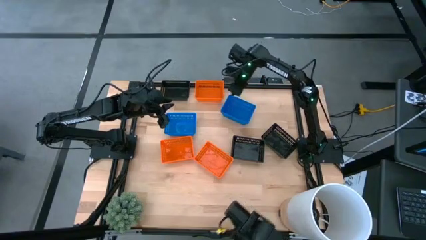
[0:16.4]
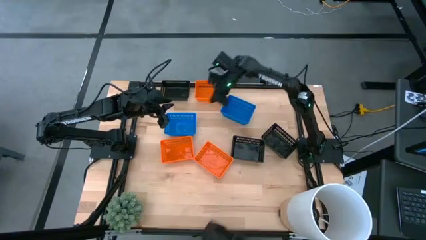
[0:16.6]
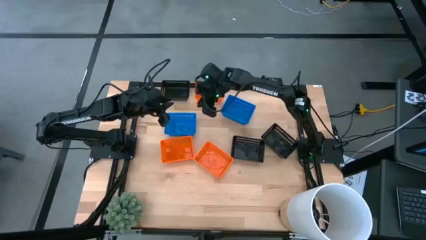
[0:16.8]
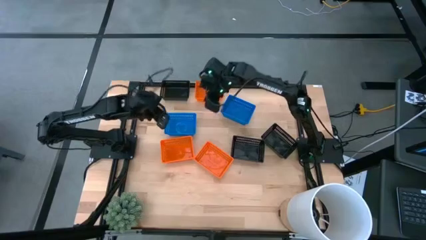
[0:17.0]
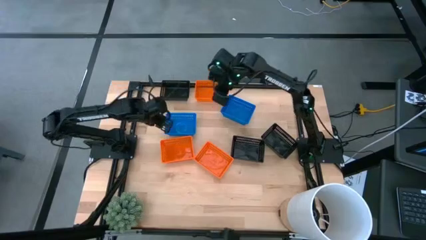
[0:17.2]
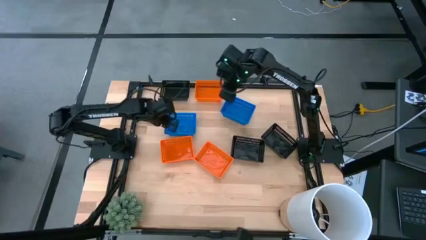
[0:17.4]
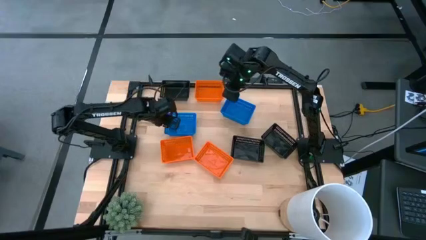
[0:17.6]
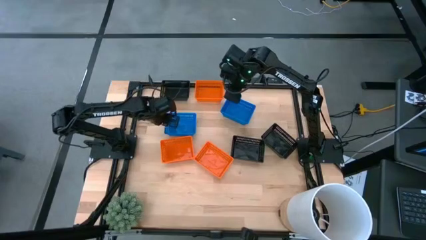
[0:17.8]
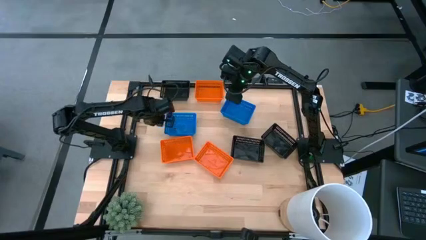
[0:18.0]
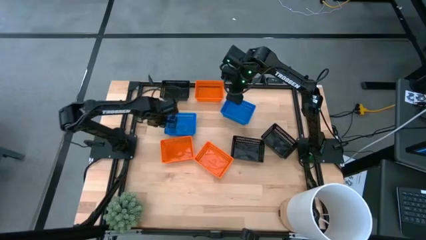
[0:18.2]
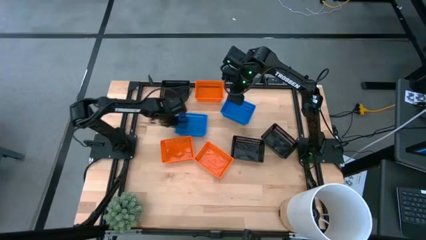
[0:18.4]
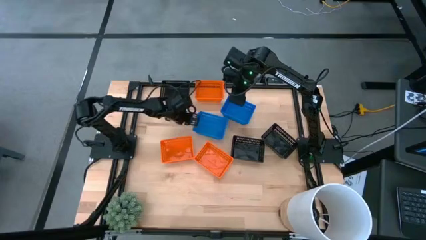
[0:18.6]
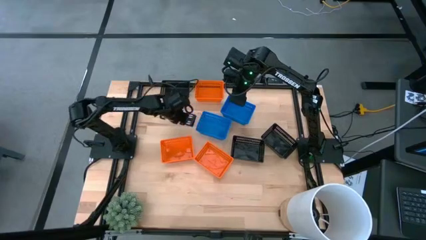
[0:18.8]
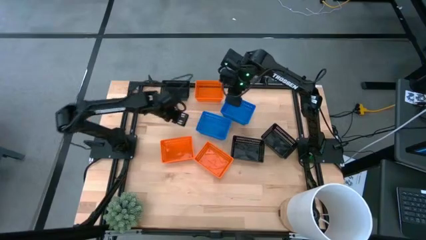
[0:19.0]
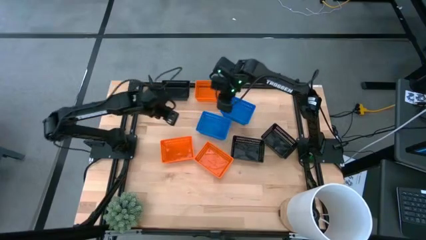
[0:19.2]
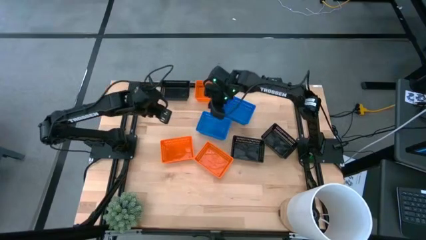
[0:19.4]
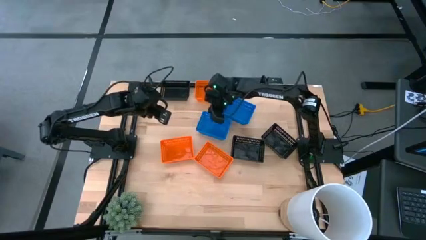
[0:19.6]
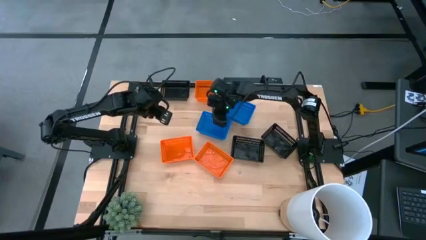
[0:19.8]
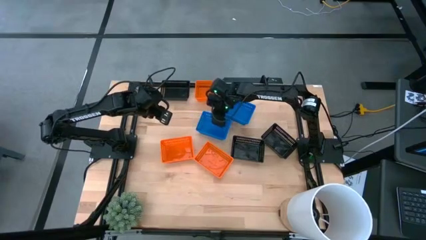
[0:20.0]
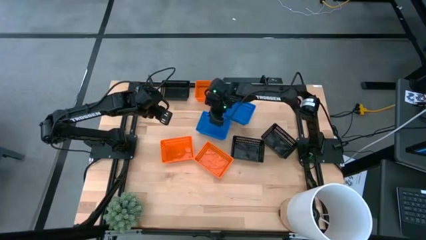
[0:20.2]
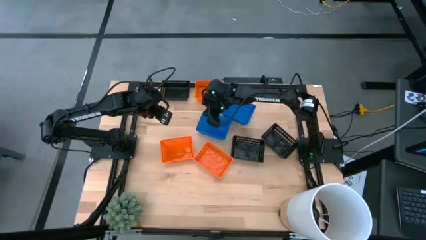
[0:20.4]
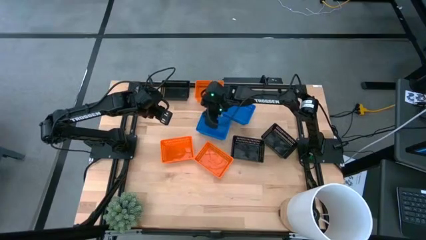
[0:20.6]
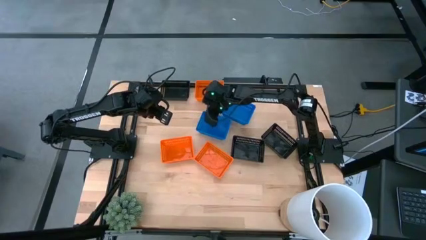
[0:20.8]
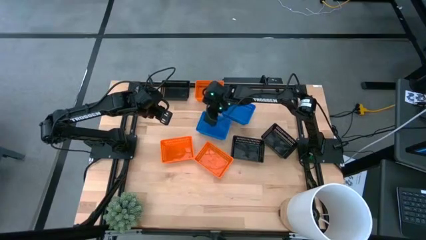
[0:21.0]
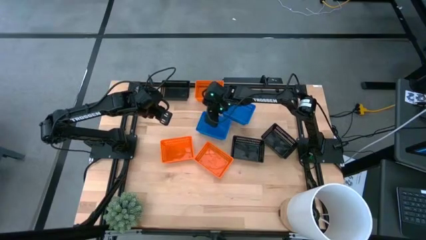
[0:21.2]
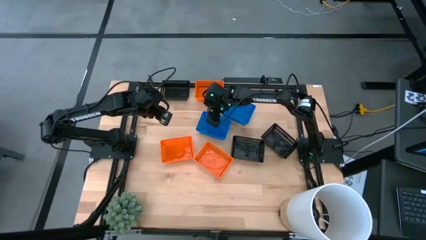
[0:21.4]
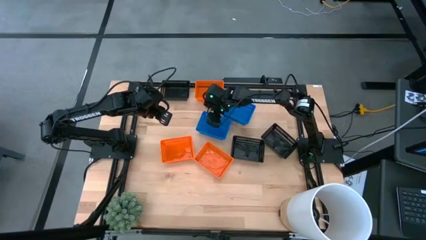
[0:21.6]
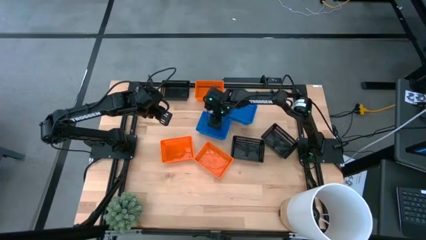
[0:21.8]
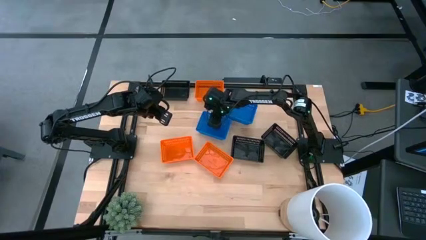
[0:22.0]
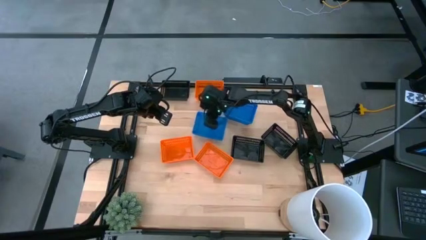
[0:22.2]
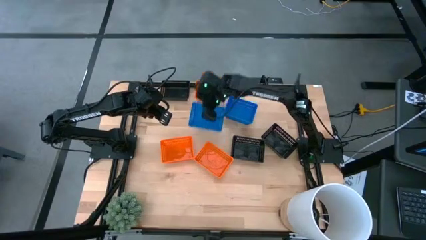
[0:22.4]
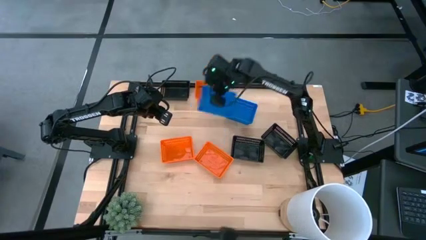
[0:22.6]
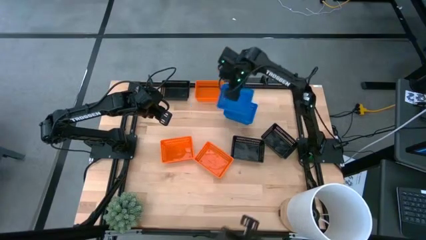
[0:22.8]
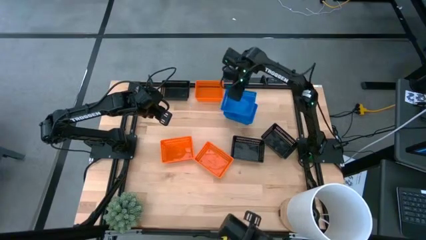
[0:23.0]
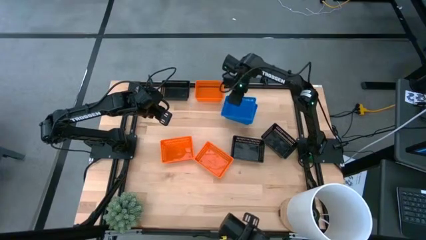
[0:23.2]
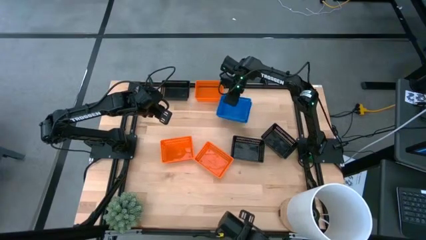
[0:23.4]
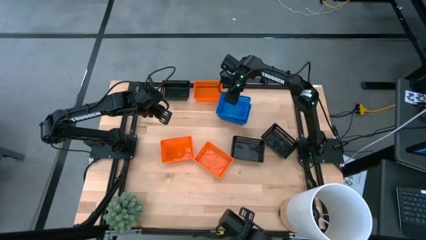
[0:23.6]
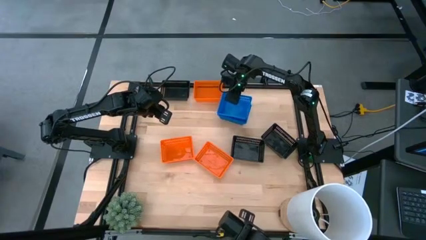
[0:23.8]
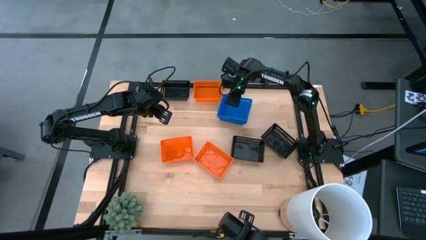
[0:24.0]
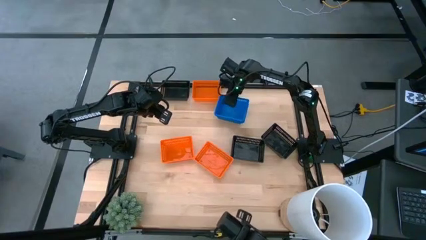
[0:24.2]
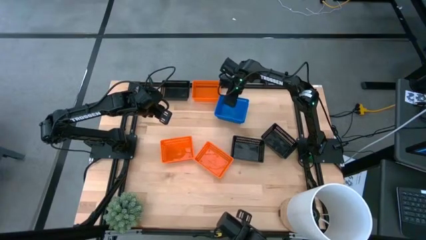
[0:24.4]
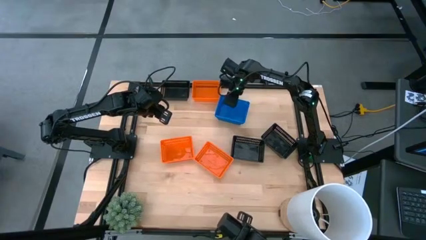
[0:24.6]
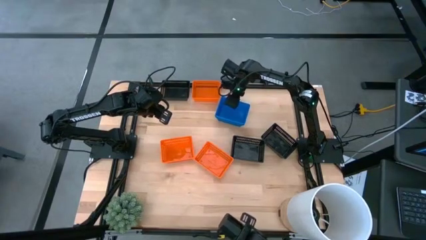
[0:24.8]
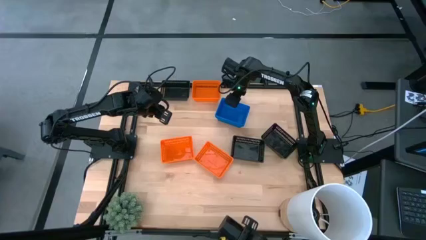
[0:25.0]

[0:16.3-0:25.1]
Stack the left blue bin on top of the right blue bin

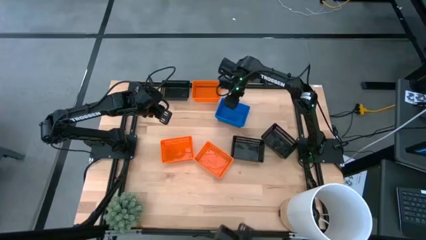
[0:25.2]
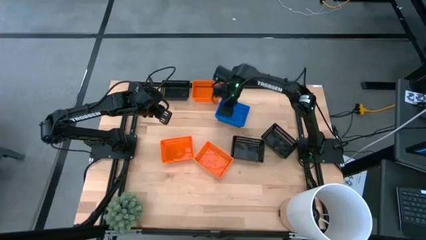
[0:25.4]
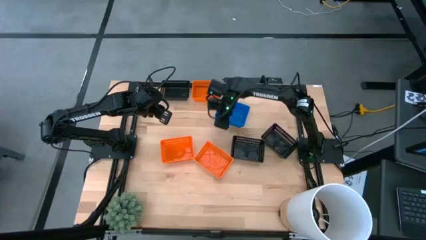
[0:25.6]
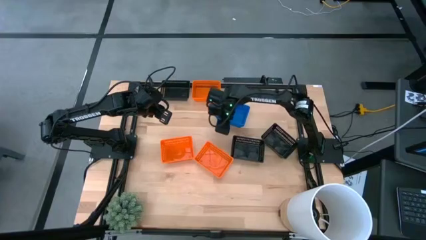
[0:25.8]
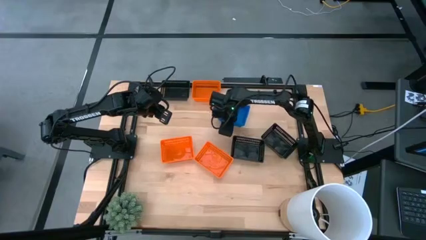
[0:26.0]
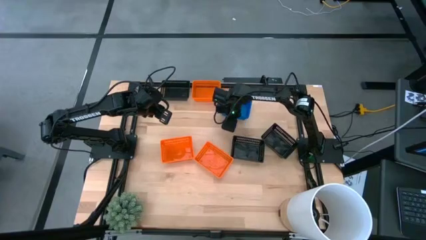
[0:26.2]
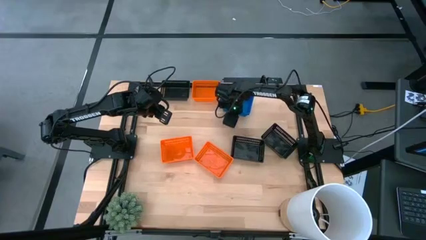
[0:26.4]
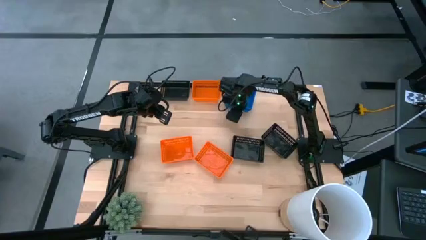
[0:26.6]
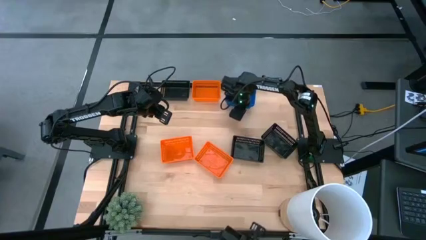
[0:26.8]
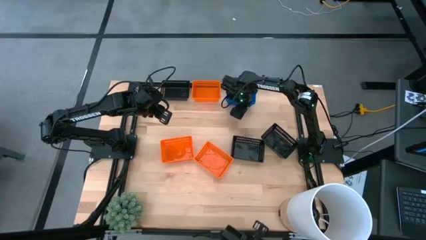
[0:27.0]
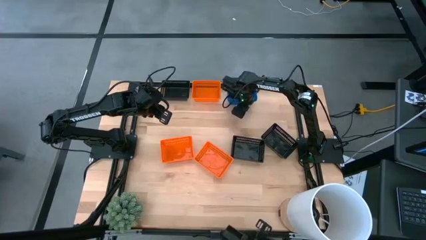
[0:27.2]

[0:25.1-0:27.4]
Adjust the stacked blue bins

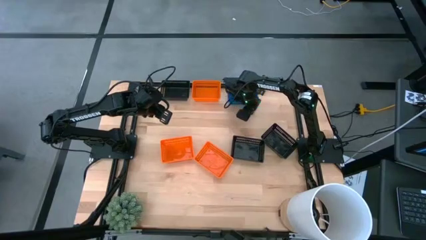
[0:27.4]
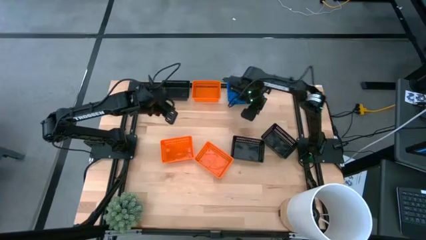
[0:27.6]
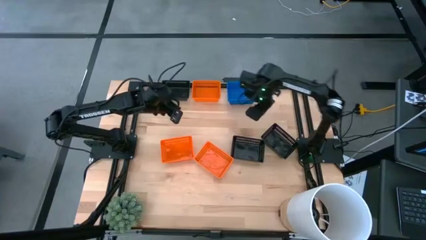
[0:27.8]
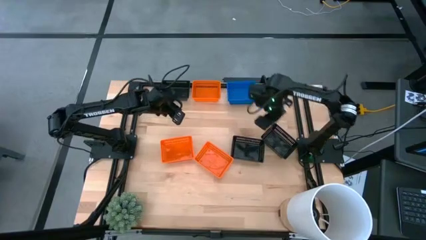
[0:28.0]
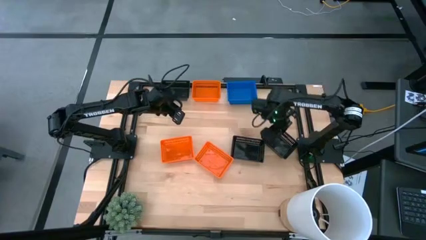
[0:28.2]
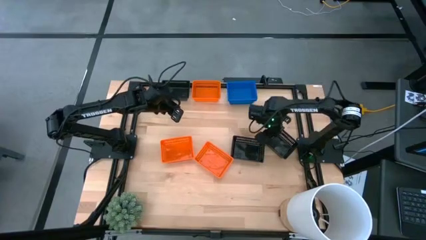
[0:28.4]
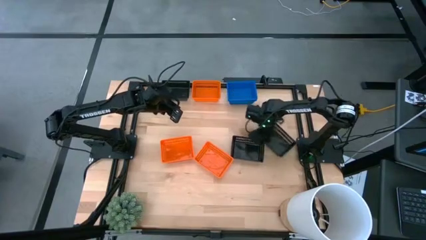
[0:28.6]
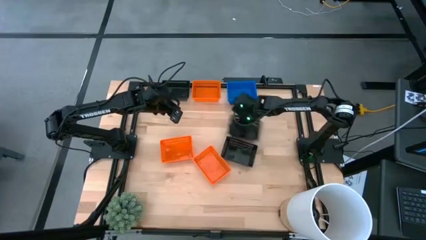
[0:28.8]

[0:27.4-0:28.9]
Move the bottom right black bin to the top middle of the table

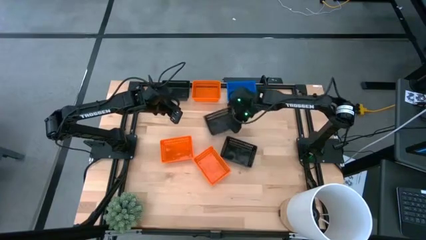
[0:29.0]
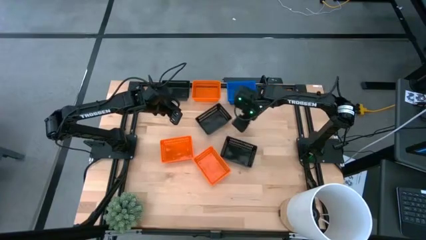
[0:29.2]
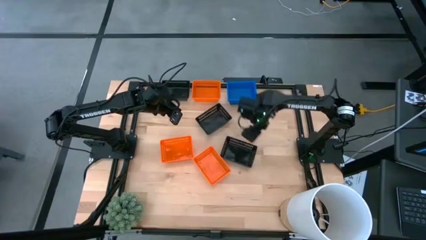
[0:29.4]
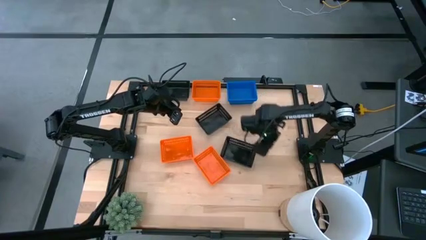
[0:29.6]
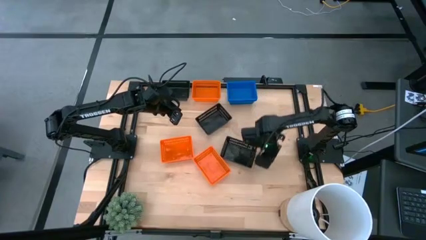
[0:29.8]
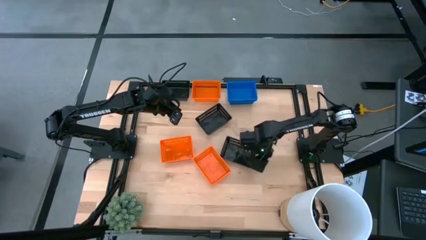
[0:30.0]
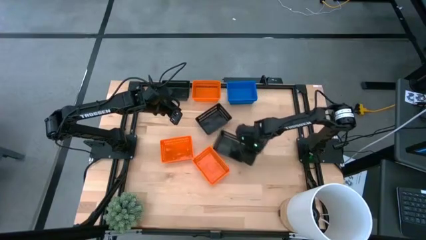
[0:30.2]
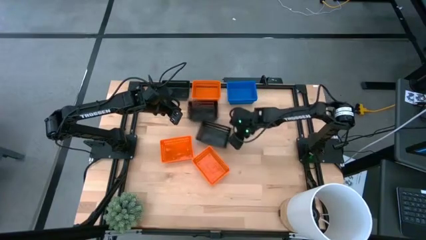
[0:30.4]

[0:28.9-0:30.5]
Move the bottom black bin to the top middle of the table
